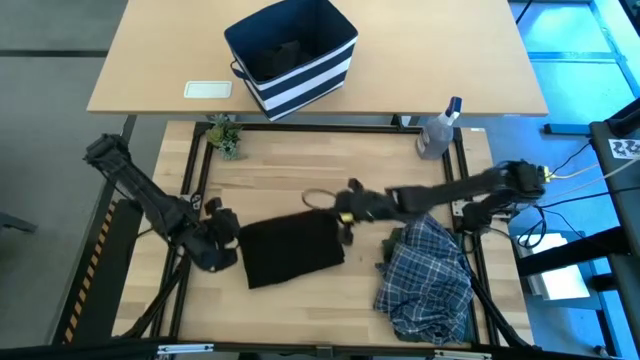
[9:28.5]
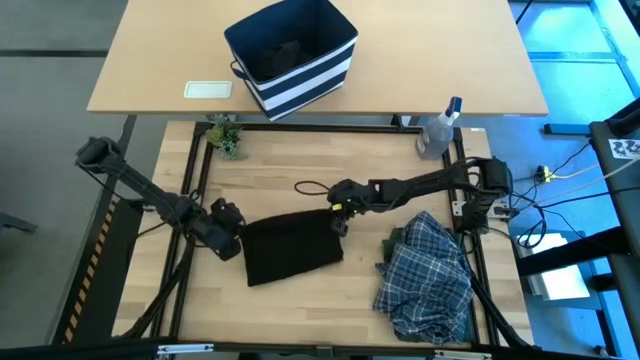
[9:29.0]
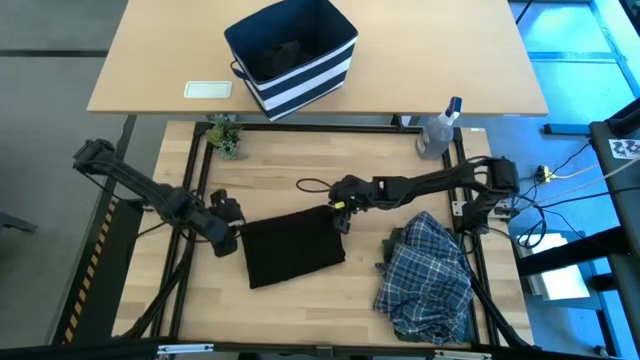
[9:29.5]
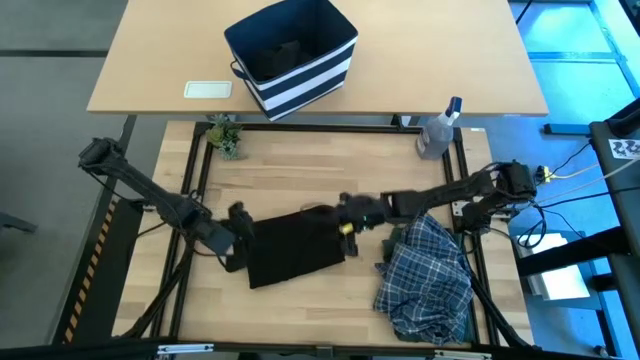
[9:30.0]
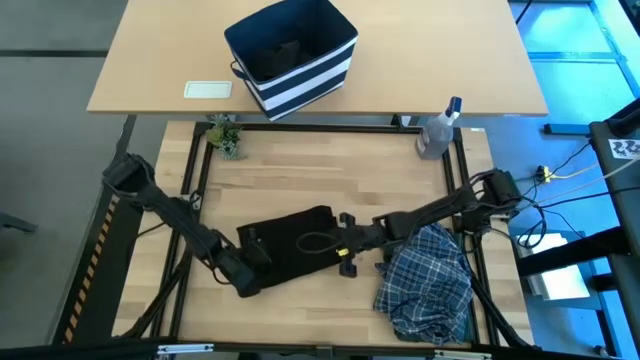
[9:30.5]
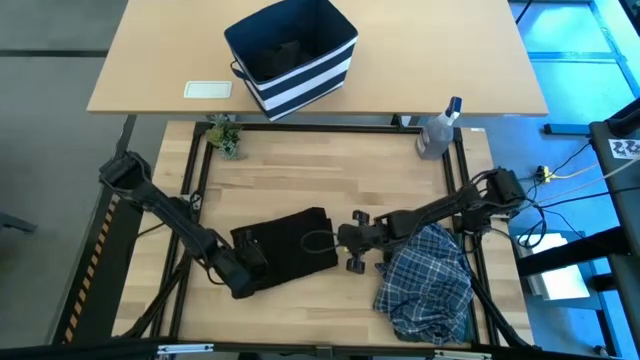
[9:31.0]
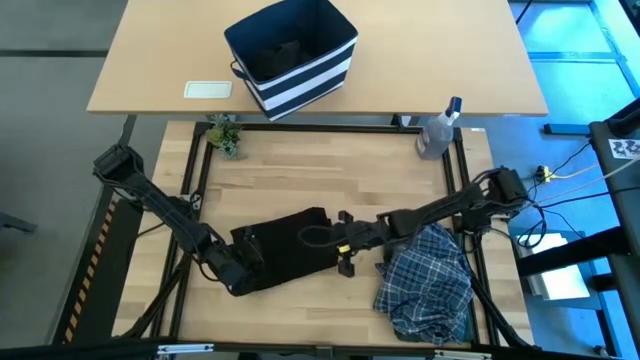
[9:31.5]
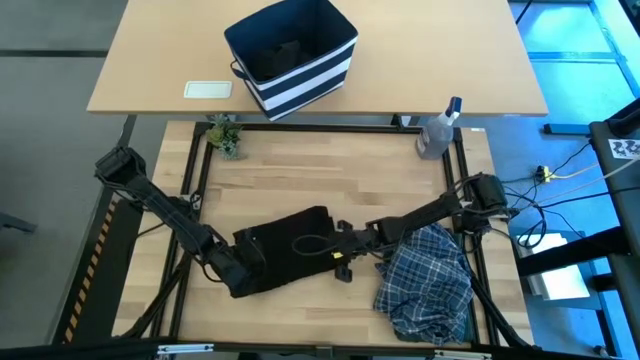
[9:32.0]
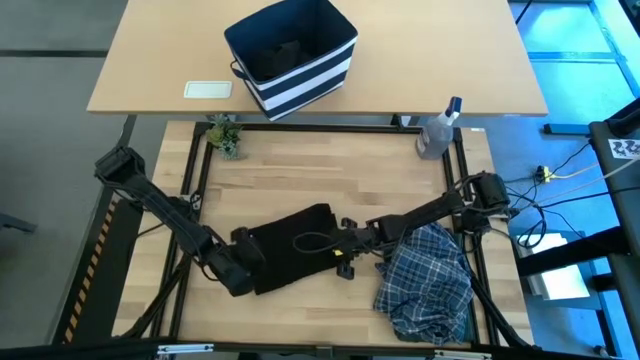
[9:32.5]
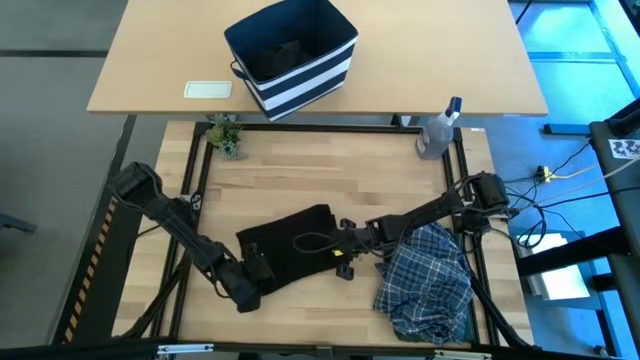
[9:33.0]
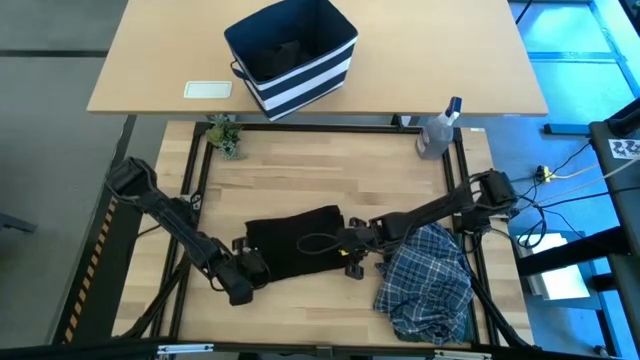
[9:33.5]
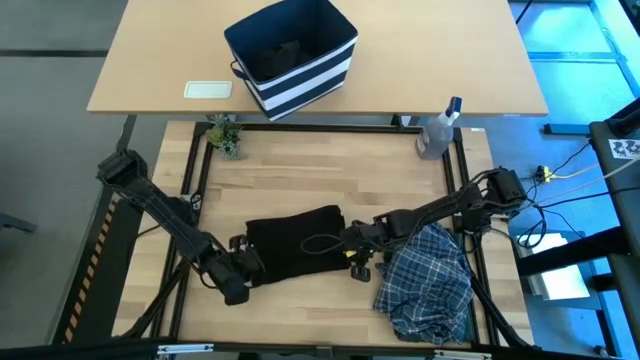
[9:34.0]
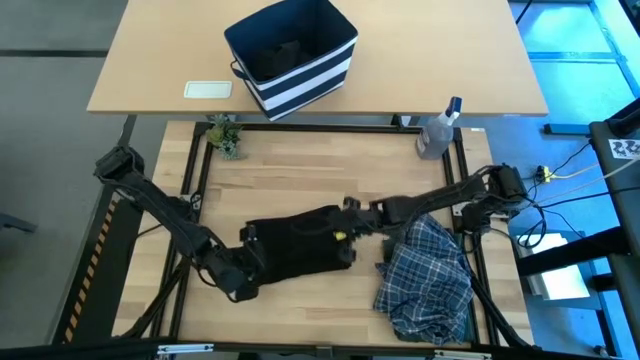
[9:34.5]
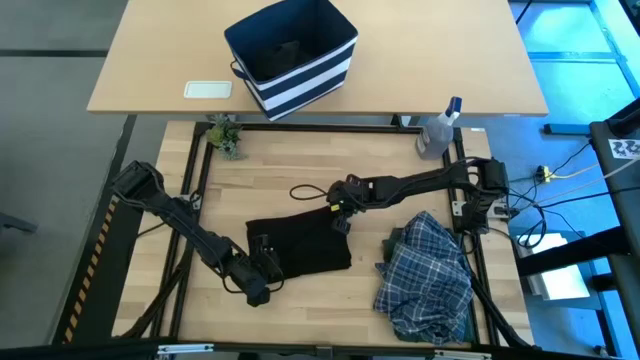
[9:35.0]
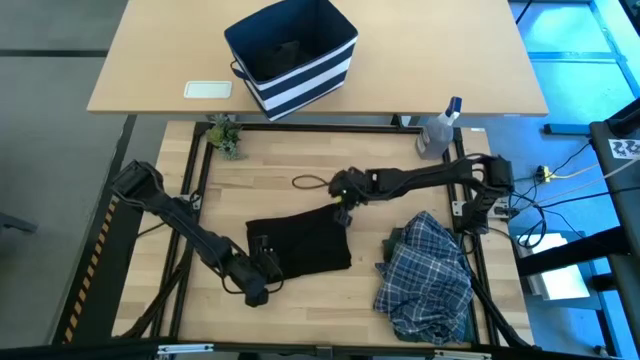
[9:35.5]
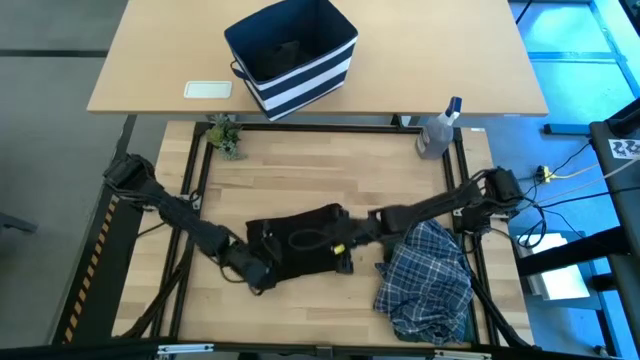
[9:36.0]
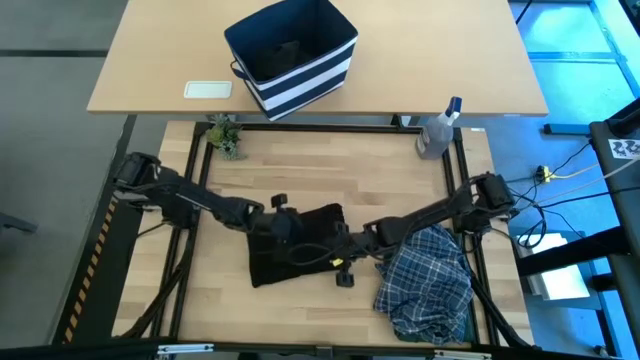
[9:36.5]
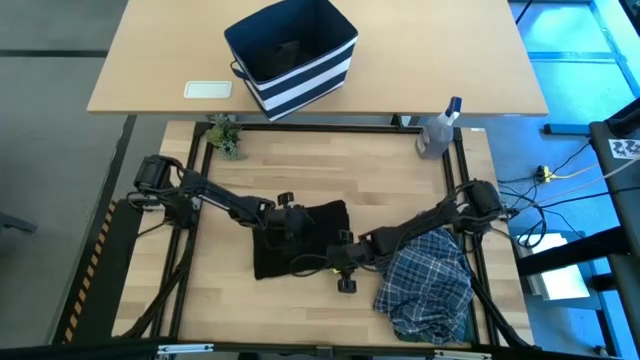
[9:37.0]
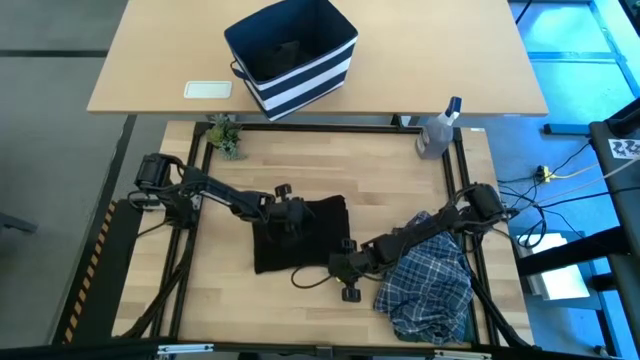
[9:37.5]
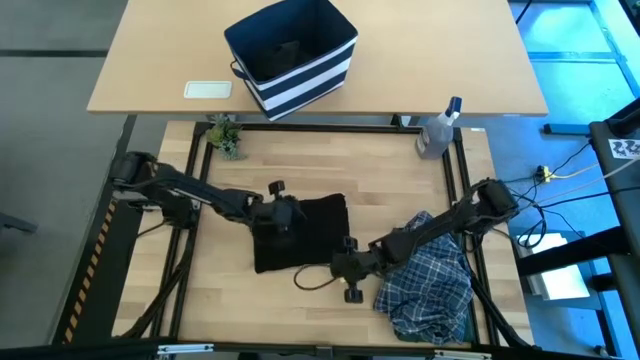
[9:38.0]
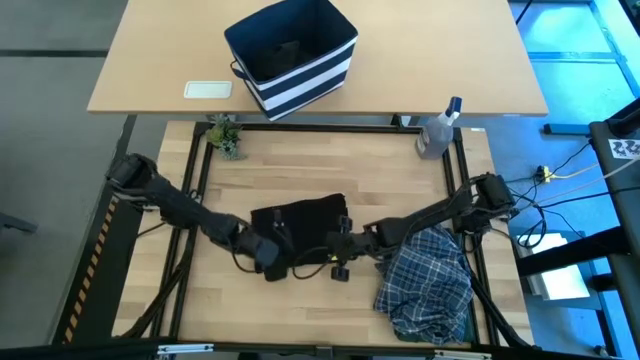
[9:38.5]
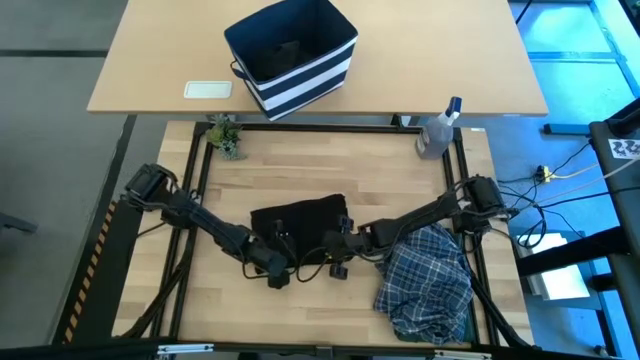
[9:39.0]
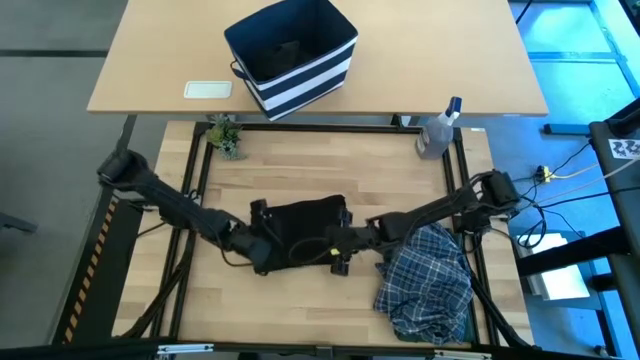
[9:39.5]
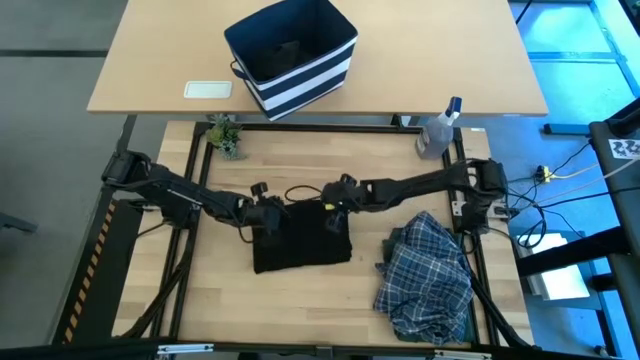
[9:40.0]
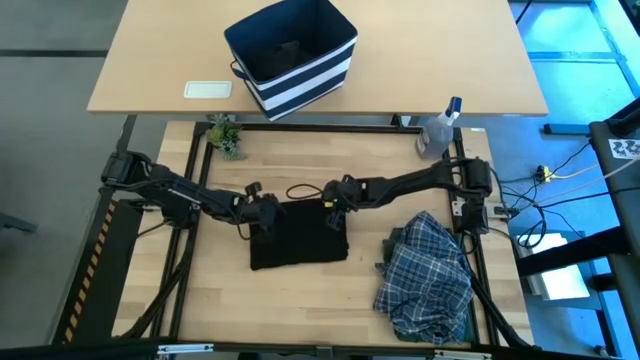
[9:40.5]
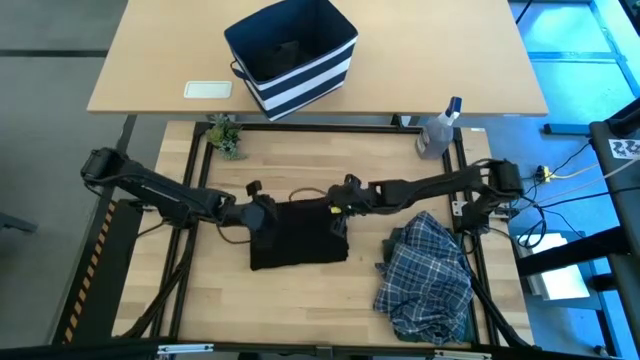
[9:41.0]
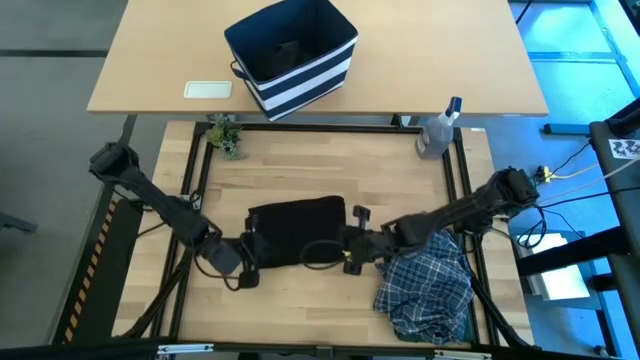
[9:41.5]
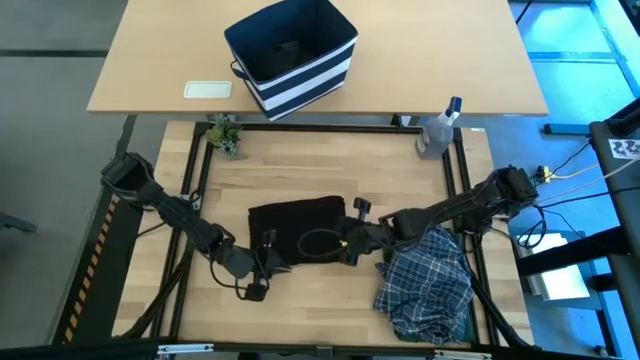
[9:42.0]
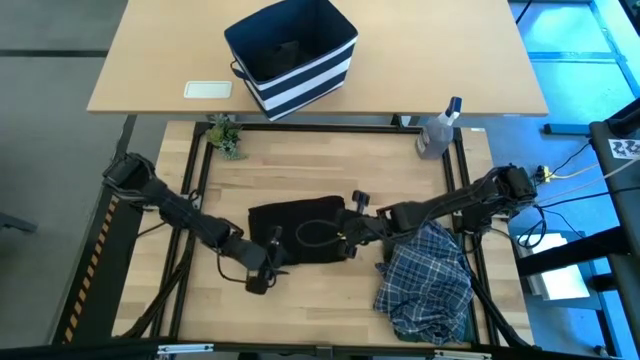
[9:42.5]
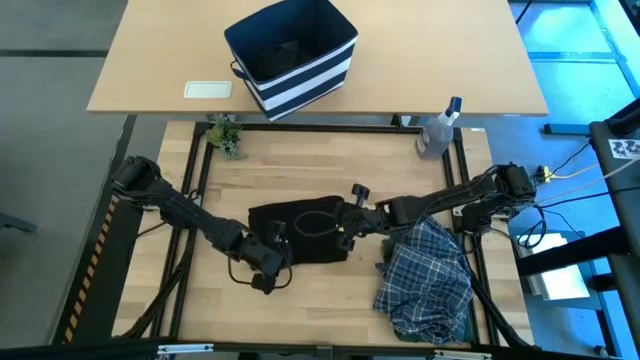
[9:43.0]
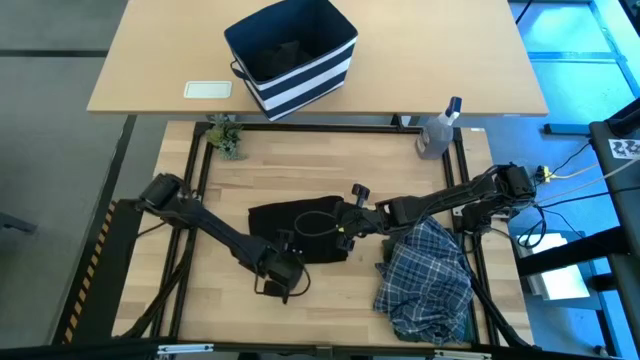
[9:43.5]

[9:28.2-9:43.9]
Task: Fold Laundry from Bin
Fold the black shirt

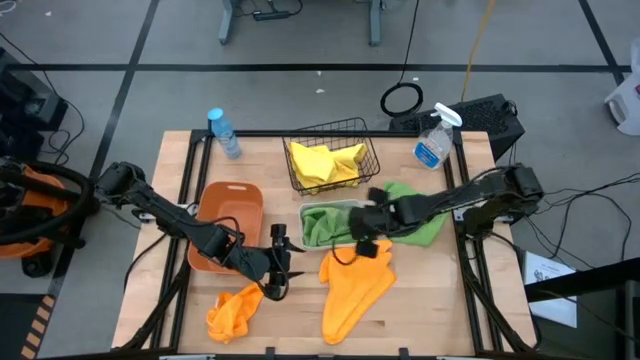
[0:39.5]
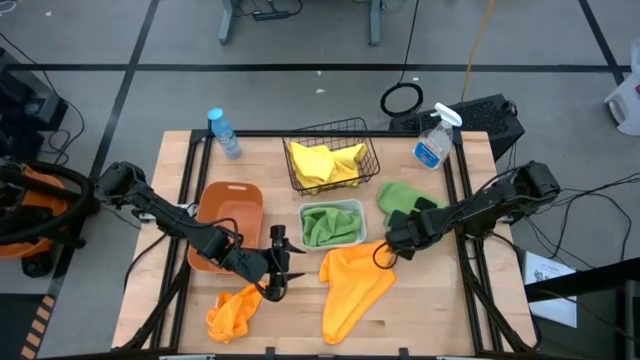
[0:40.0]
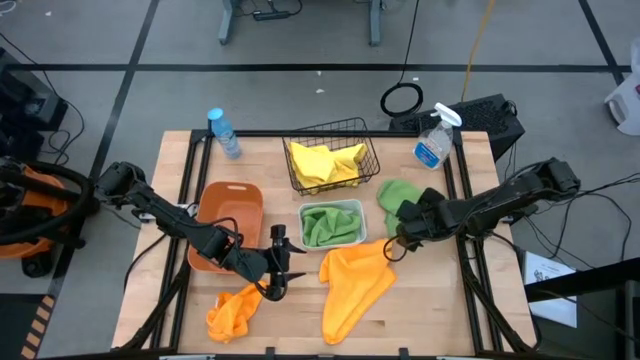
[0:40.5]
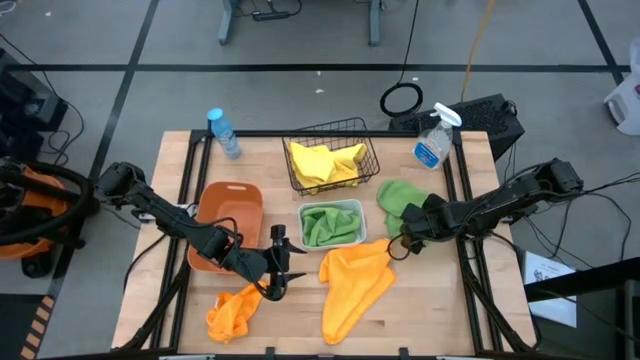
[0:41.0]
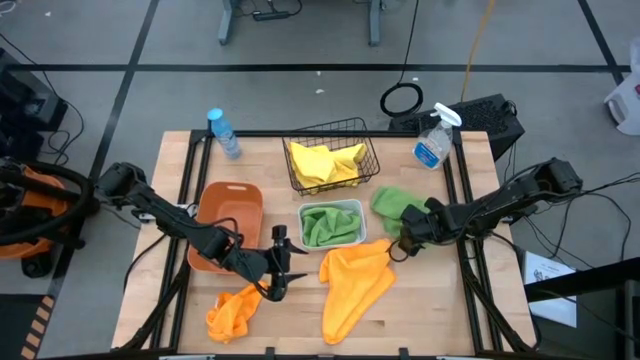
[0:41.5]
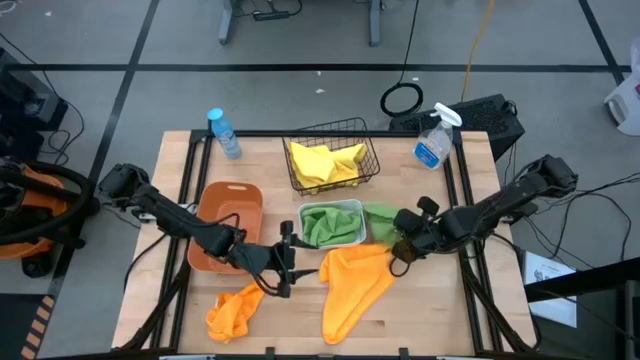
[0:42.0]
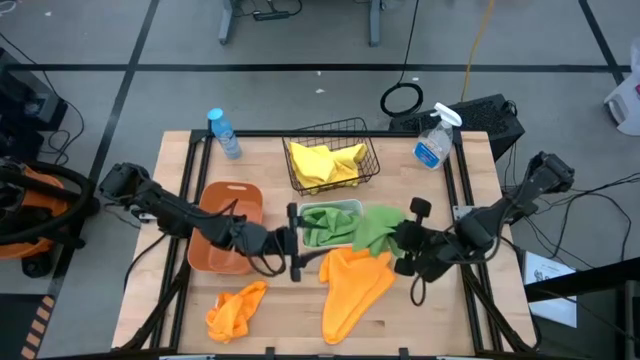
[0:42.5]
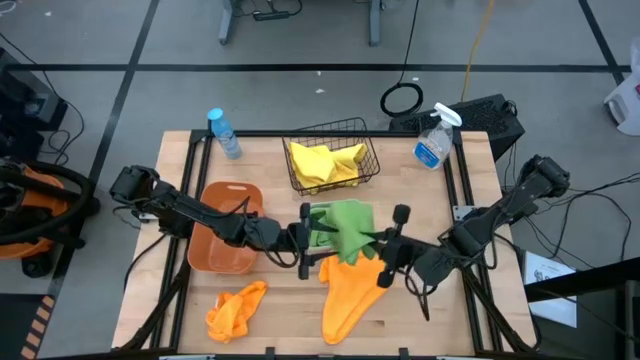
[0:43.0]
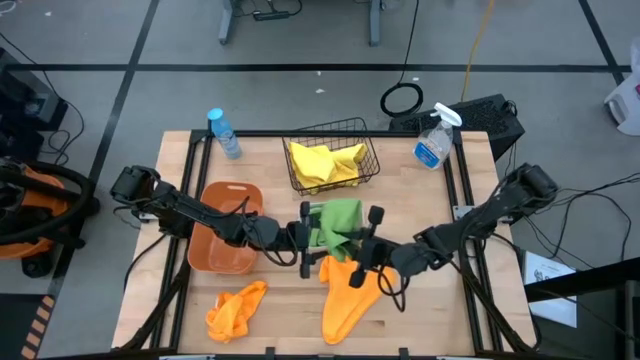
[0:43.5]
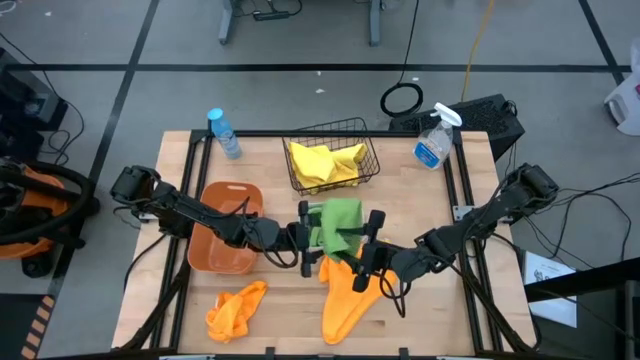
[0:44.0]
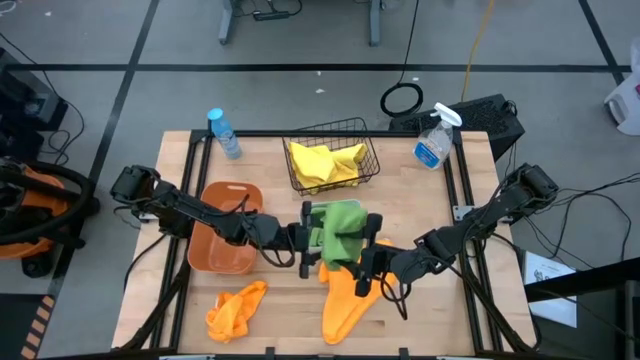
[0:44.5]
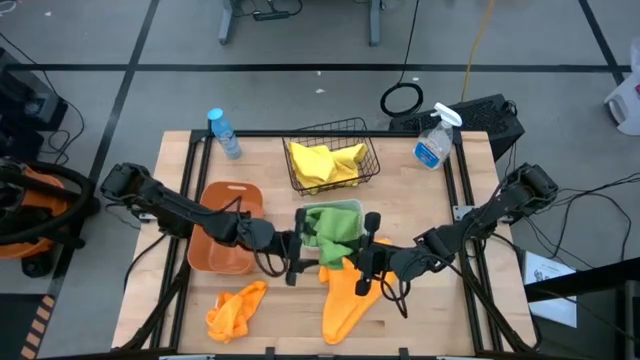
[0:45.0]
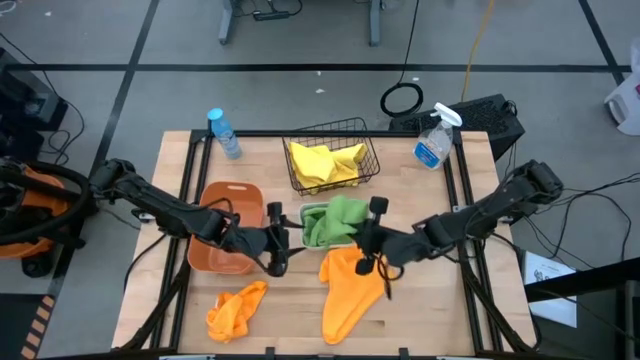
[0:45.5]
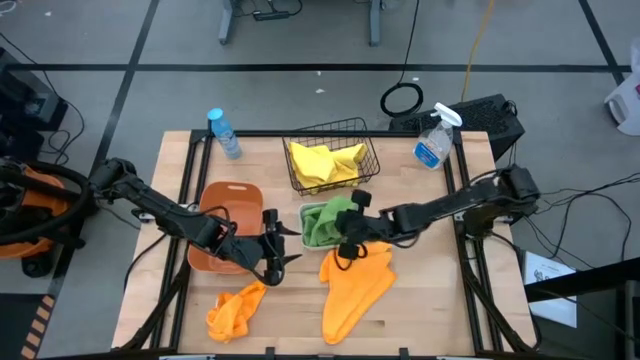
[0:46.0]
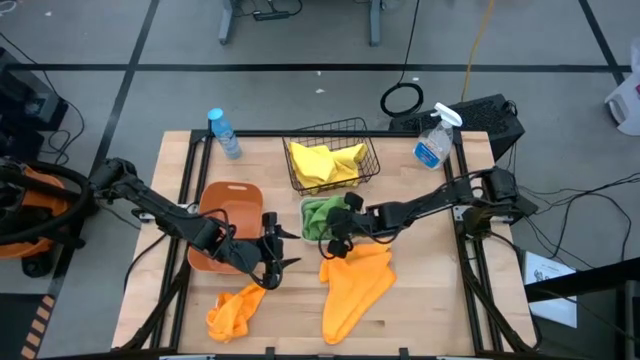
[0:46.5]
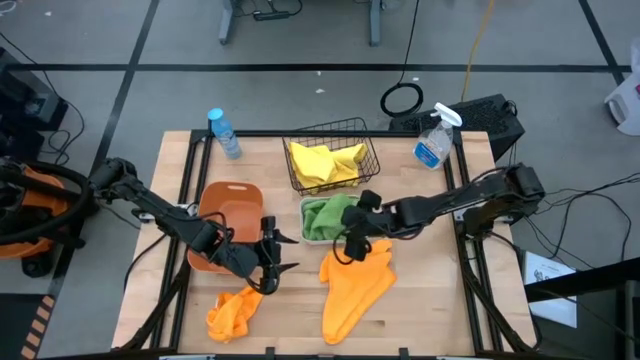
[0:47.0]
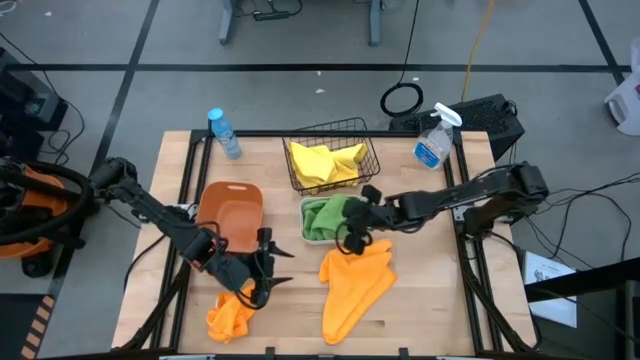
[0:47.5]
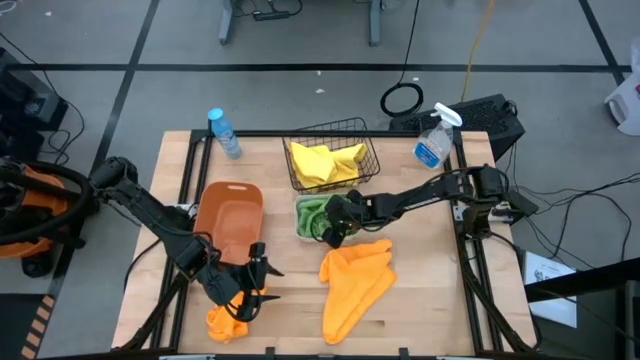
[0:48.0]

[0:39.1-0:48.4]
Task: Sort microfiber towel by color & place in baskets
Put the green towel into the white bin
